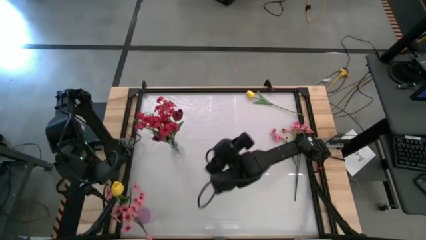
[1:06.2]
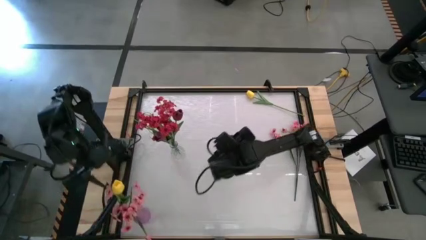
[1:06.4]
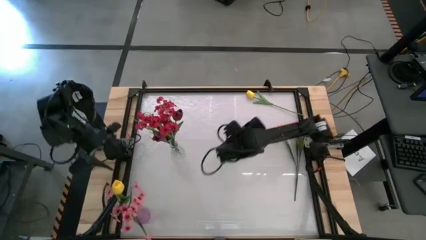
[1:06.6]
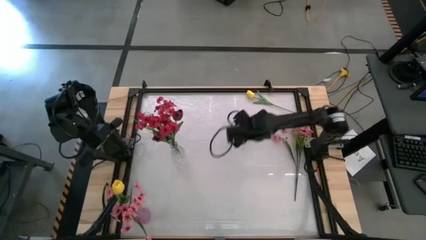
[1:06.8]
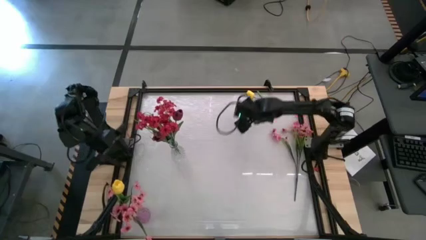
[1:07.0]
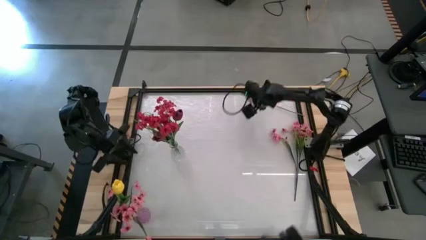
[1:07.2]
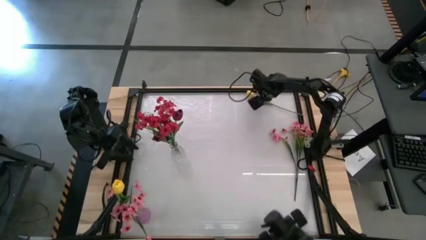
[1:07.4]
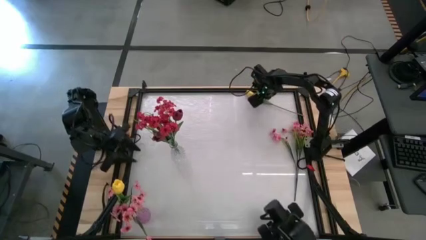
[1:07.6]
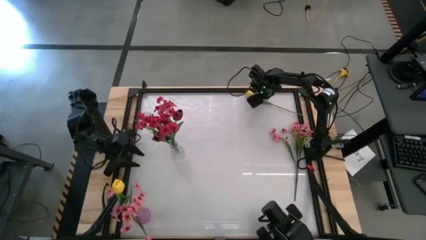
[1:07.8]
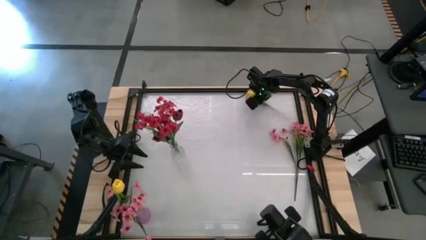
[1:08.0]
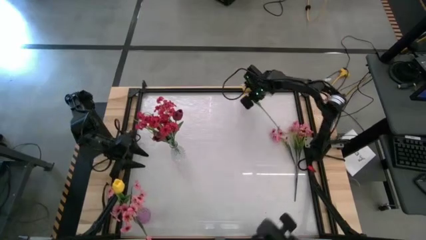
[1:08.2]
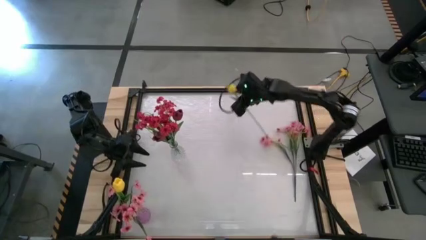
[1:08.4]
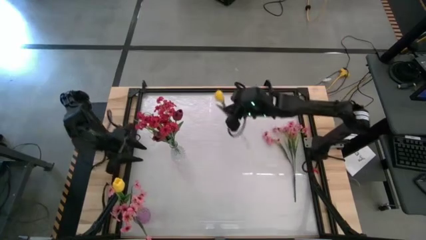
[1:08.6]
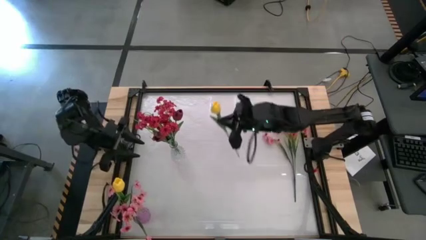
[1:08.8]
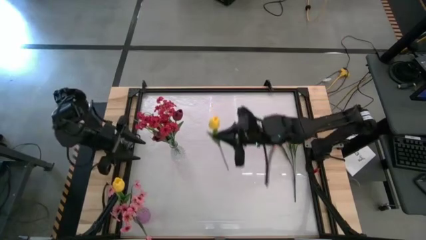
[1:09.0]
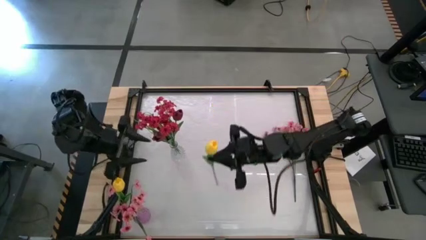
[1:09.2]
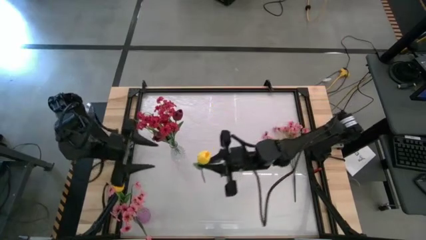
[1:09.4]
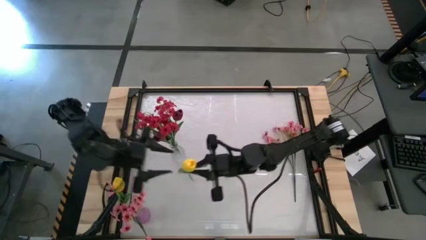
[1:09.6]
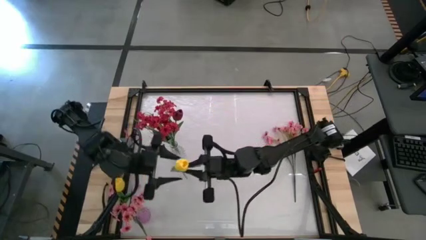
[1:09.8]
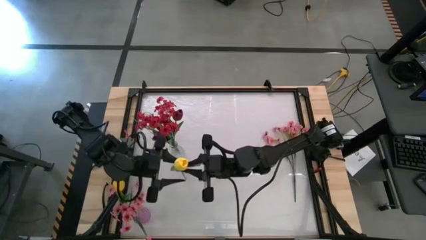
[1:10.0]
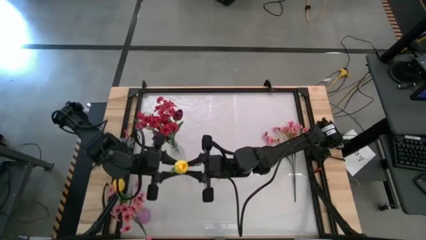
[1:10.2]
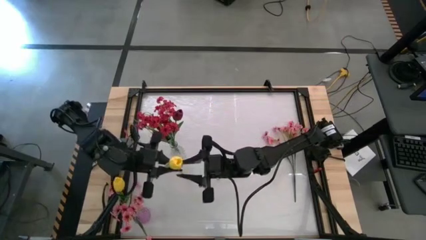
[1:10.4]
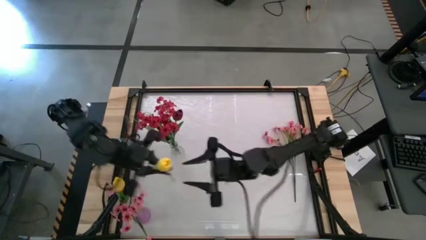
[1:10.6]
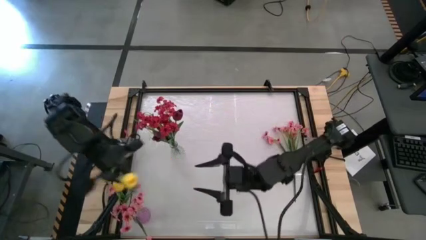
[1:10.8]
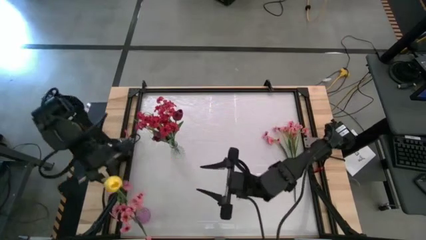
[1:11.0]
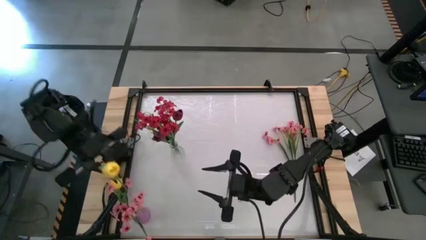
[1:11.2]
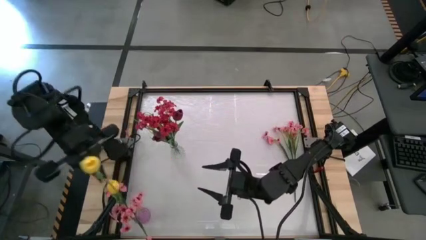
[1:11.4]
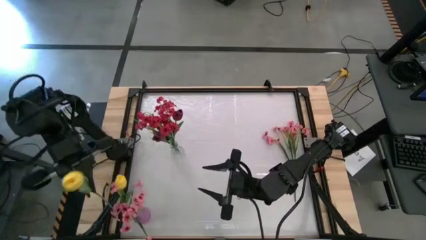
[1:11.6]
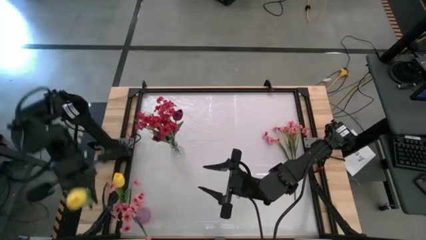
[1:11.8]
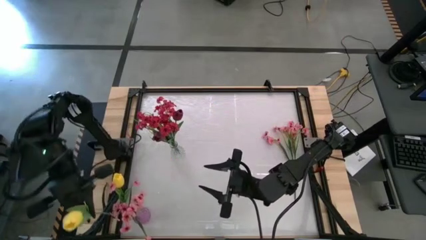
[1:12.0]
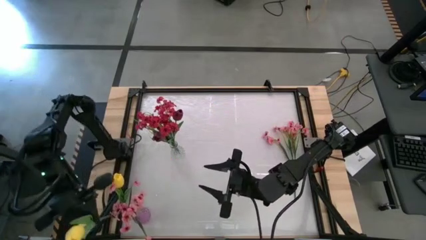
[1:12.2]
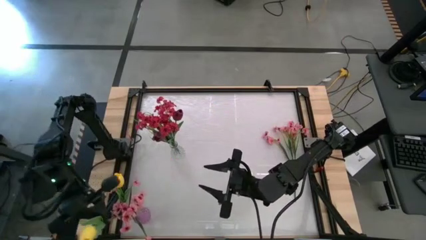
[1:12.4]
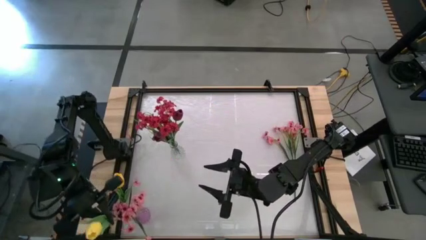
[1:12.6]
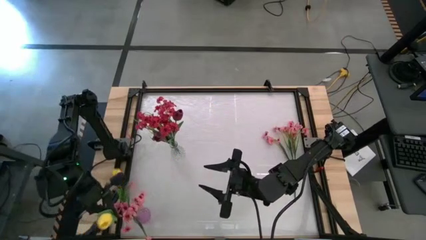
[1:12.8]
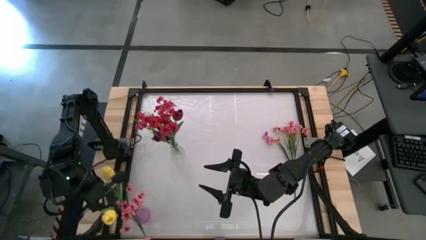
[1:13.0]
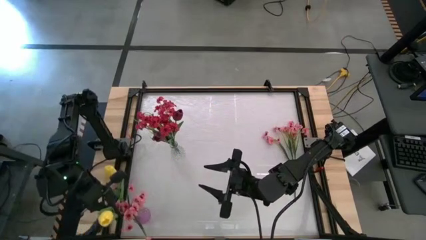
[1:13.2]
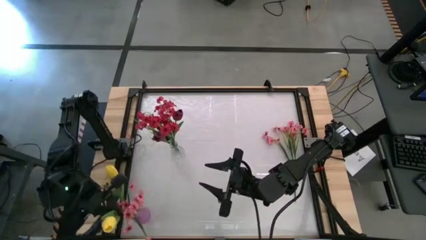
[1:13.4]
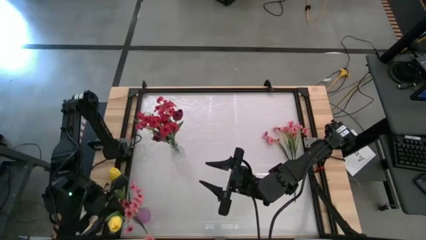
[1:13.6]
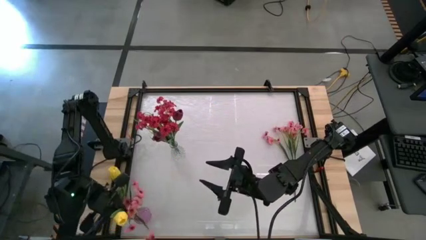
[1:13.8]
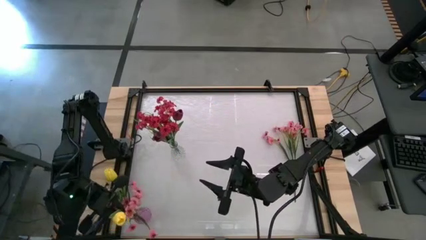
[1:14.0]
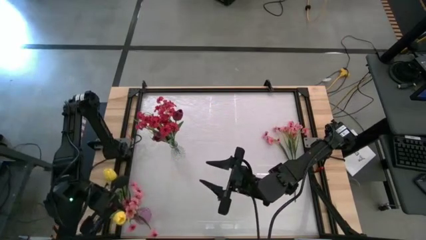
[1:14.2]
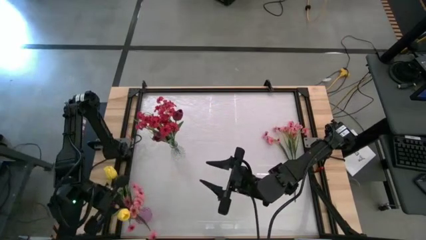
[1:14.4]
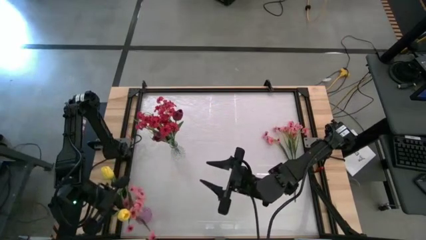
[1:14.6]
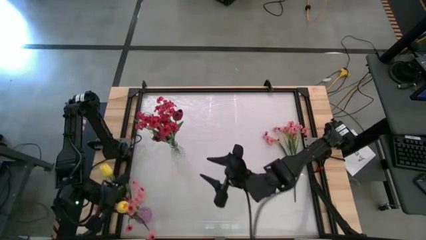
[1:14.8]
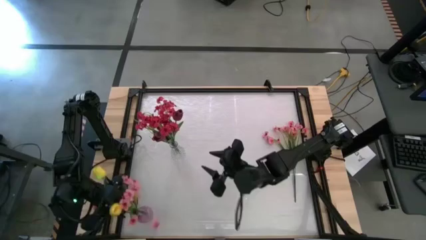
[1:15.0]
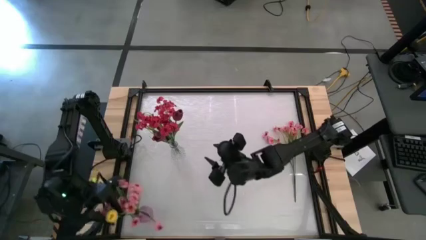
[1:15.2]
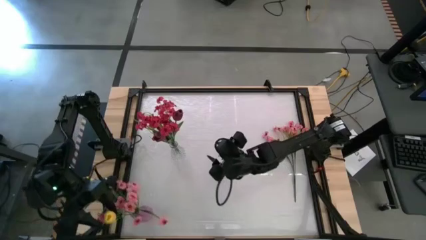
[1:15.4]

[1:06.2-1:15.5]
Task: Sort flowers into vase by color
Put the yellow flower into the purple vase

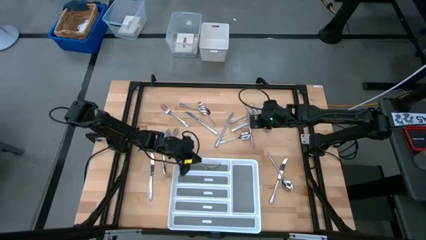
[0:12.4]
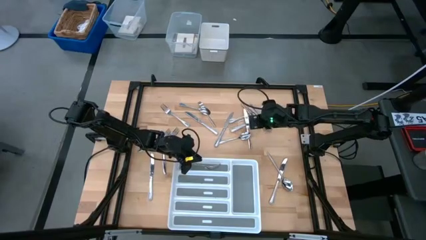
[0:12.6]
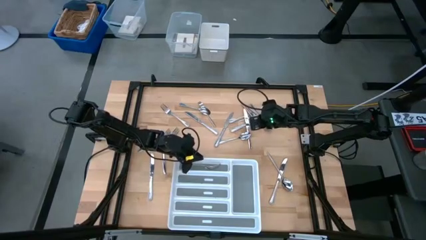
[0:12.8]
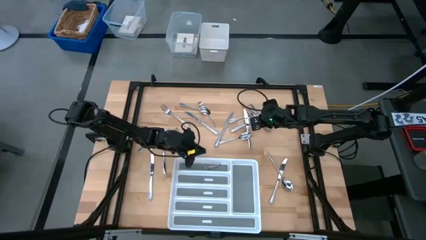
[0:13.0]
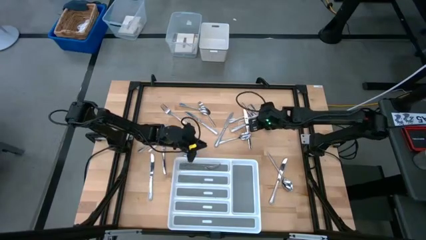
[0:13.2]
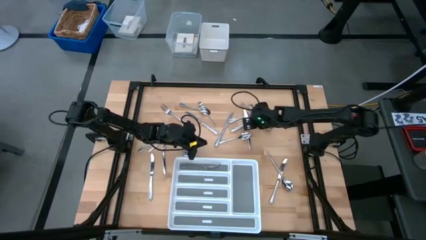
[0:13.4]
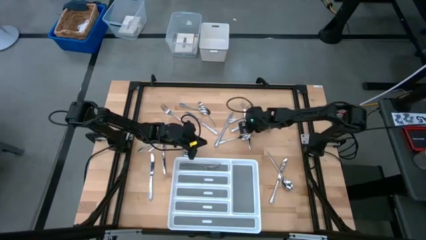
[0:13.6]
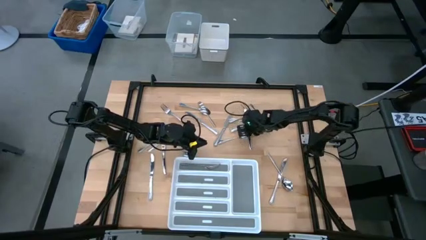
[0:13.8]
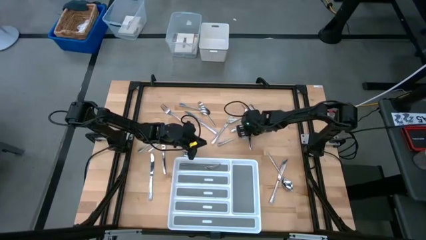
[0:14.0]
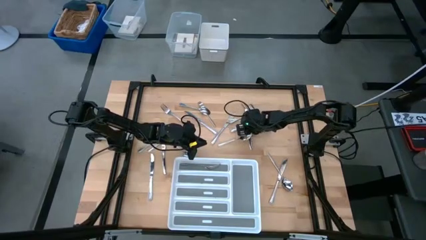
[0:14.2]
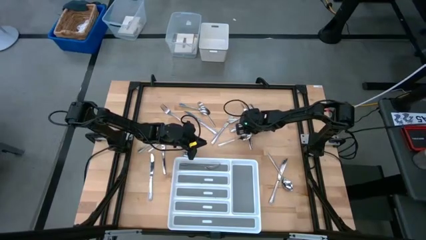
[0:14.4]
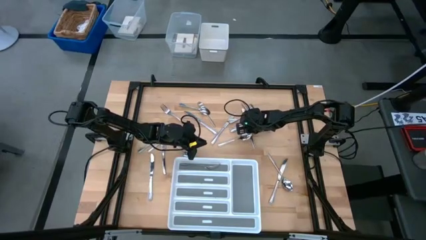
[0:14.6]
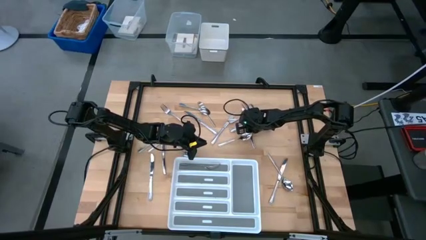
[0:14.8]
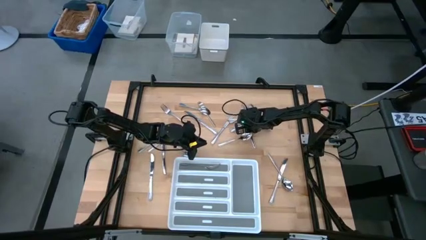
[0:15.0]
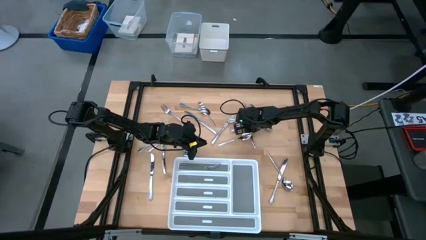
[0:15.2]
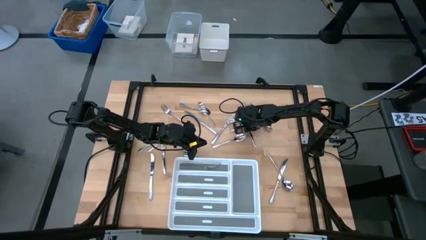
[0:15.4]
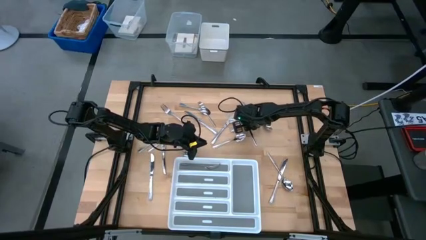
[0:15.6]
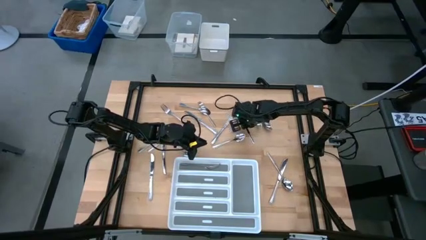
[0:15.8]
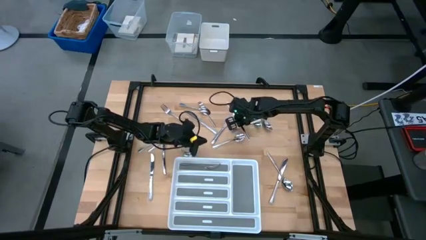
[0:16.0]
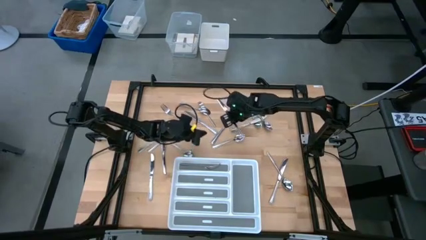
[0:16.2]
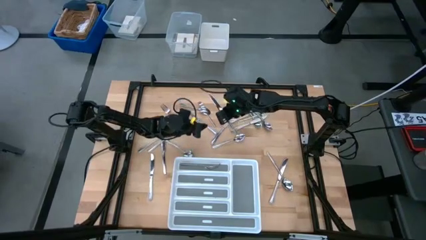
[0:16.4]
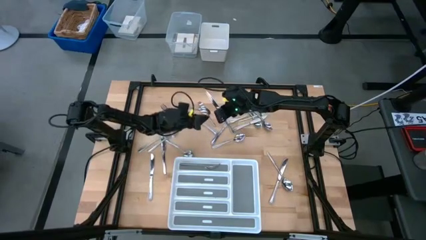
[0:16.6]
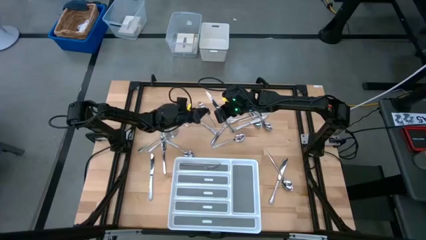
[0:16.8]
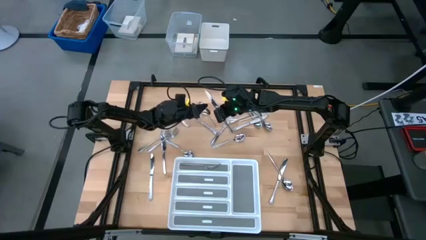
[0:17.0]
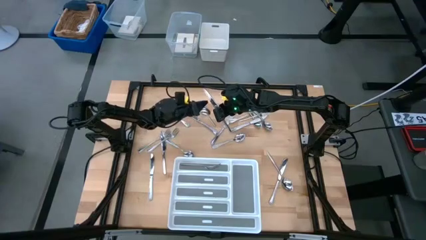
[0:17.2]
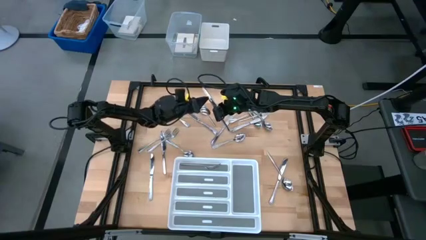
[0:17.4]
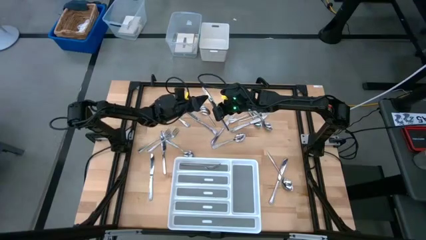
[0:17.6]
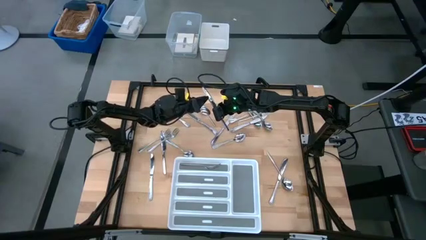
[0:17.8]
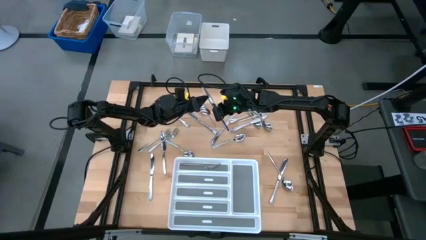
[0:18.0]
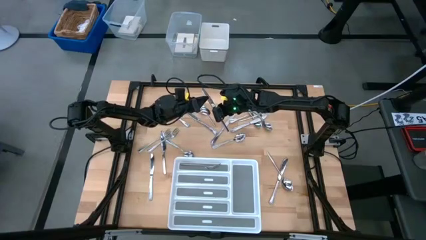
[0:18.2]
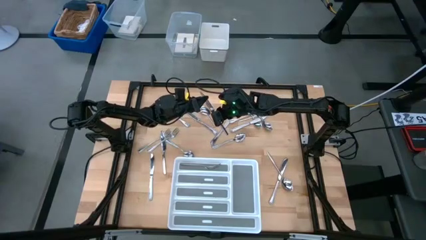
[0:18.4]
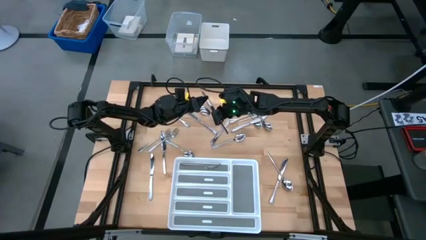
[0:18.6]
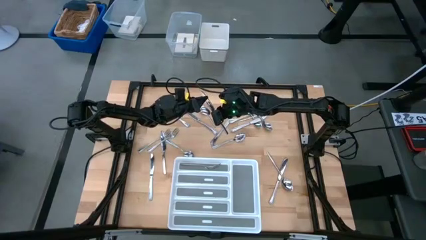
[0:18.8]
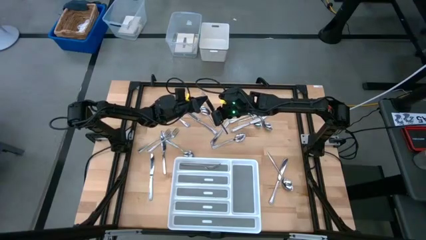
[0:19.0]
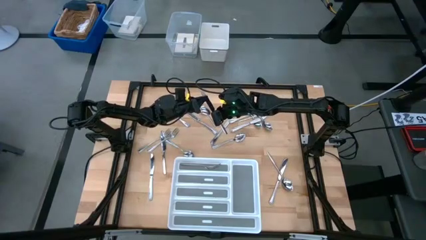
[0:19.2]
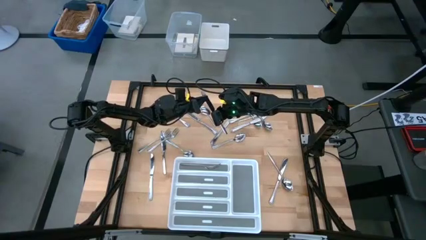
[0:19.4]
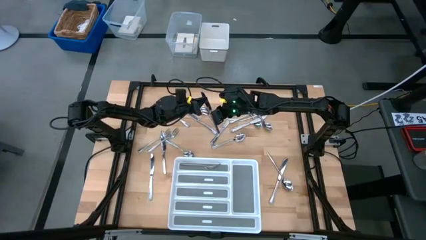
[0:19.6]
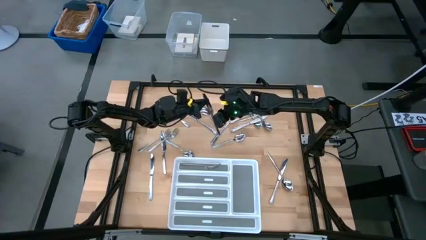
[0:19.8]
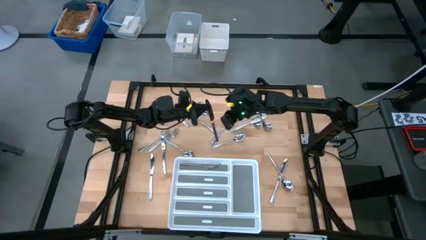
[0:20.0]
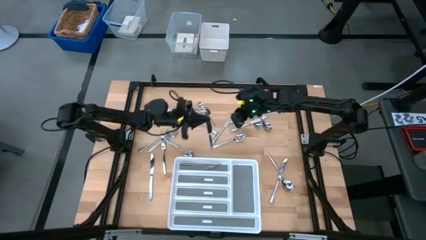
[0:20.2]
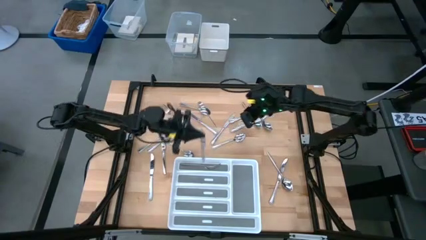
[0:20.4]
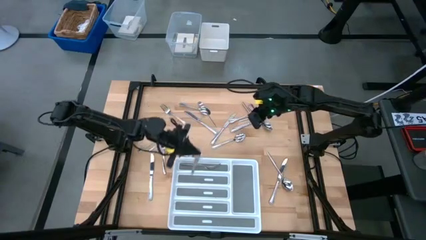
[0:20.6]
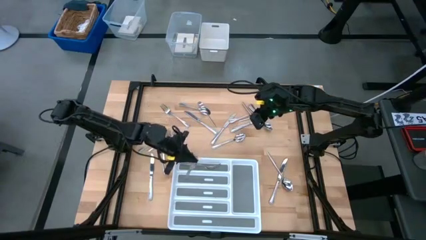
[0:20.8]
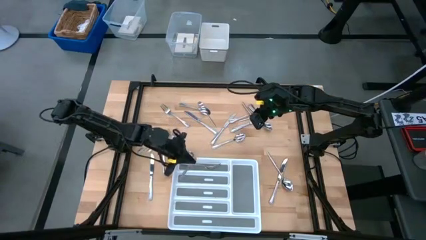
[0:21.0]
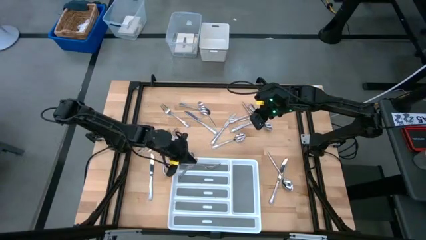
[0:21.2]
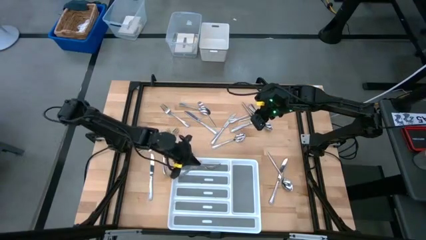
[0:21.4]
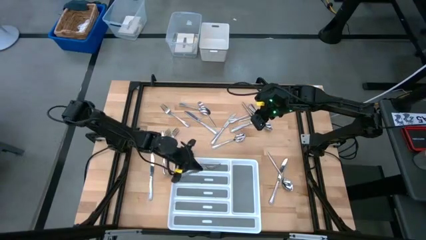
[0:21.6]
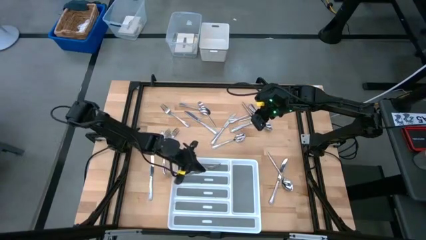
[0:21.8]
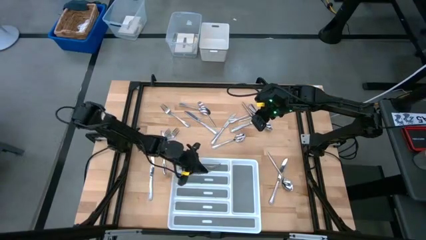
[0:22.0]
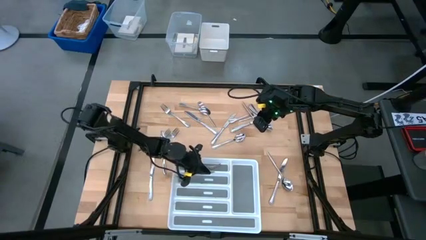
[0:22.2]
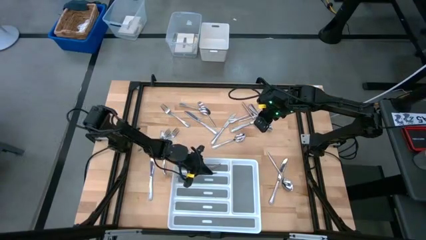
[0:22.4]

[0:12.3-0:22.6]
Task: Sort silverware
Put the silver knife into the middle section of the white silverware tray
